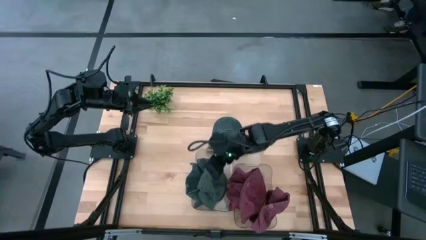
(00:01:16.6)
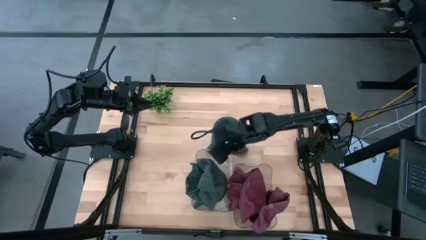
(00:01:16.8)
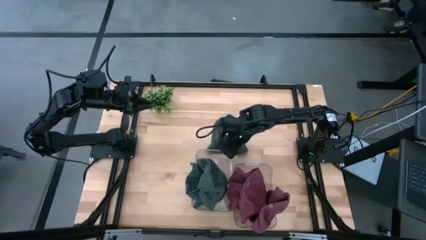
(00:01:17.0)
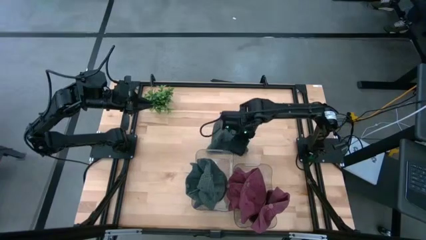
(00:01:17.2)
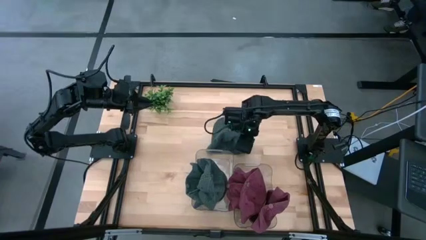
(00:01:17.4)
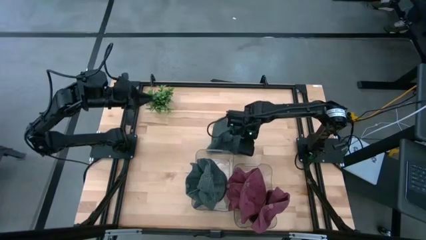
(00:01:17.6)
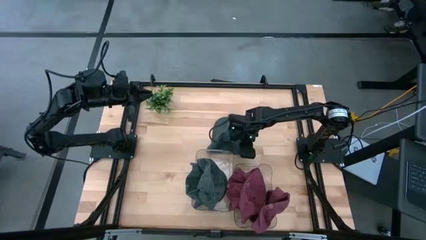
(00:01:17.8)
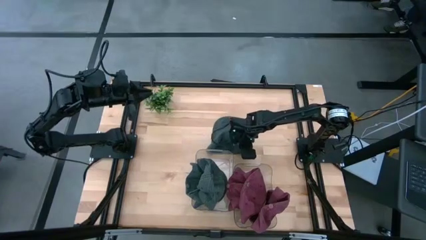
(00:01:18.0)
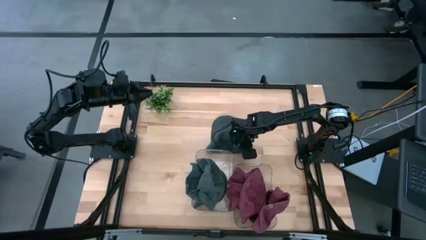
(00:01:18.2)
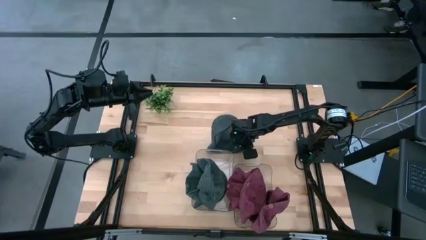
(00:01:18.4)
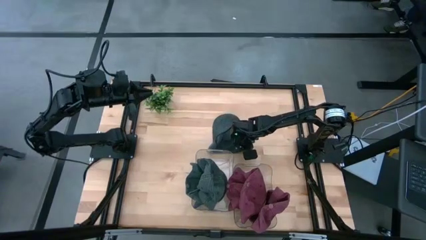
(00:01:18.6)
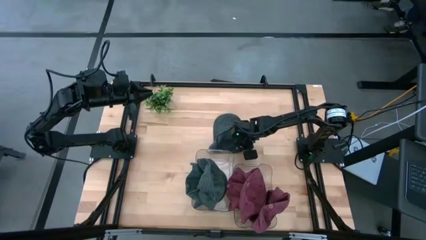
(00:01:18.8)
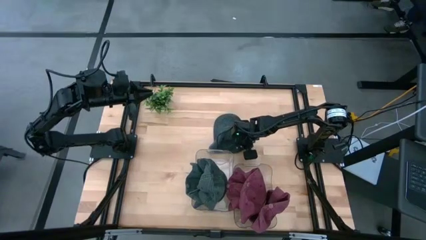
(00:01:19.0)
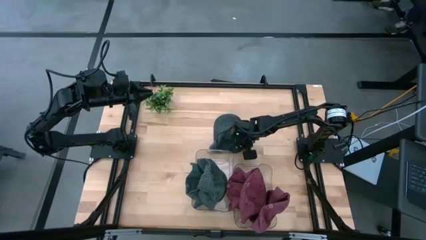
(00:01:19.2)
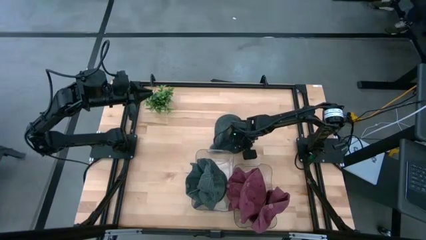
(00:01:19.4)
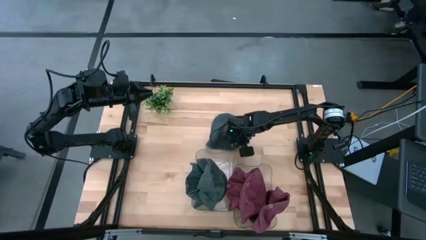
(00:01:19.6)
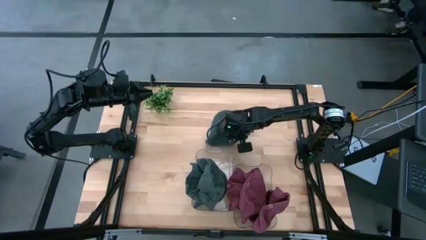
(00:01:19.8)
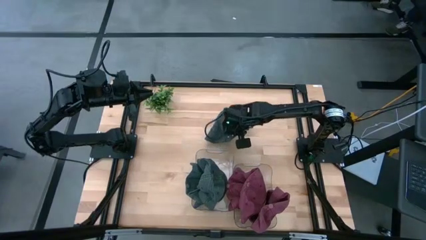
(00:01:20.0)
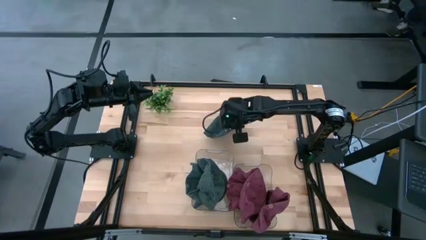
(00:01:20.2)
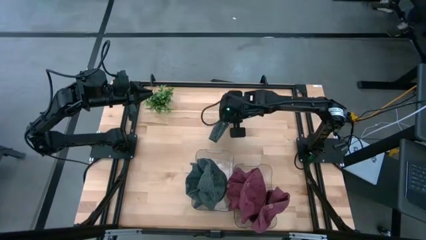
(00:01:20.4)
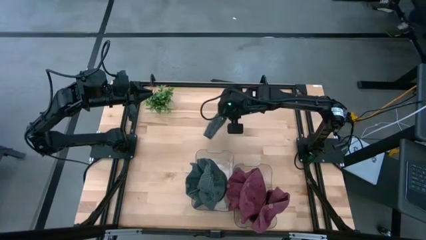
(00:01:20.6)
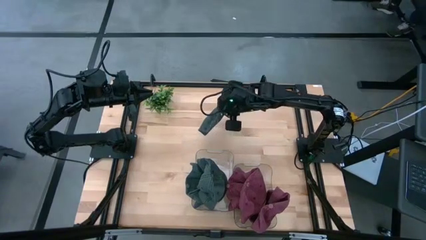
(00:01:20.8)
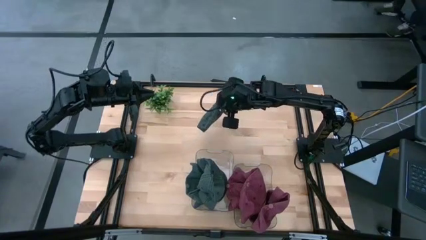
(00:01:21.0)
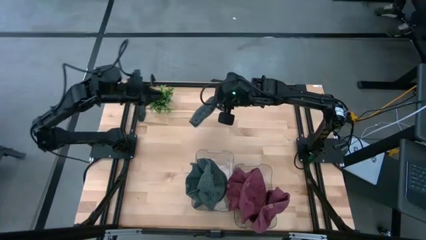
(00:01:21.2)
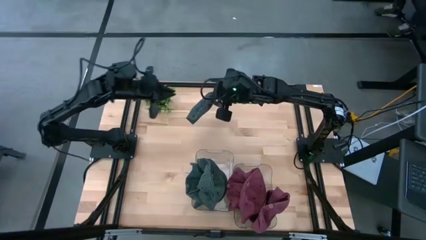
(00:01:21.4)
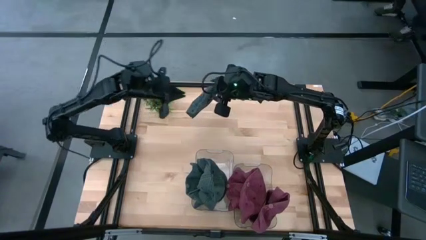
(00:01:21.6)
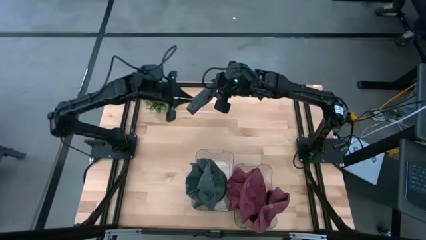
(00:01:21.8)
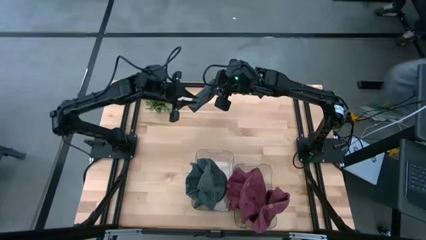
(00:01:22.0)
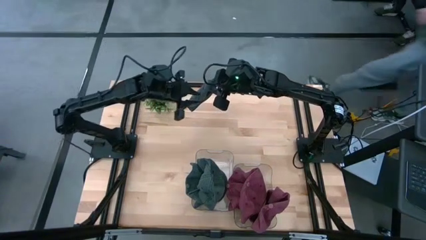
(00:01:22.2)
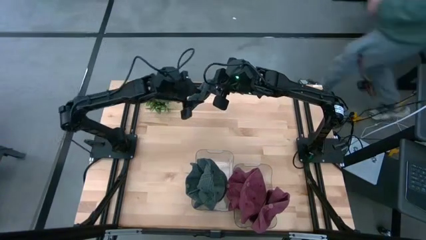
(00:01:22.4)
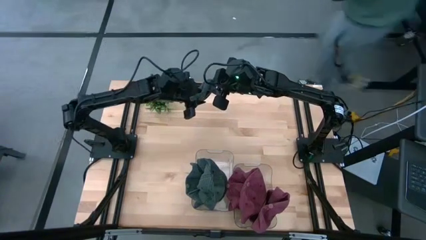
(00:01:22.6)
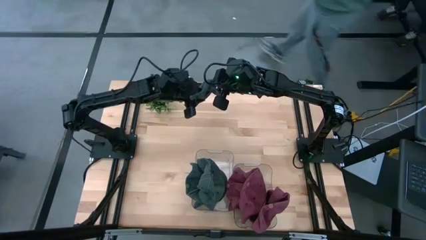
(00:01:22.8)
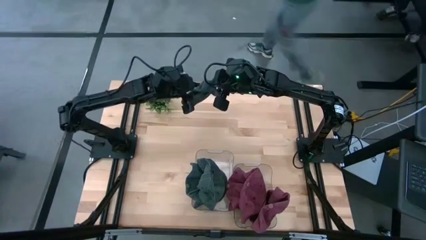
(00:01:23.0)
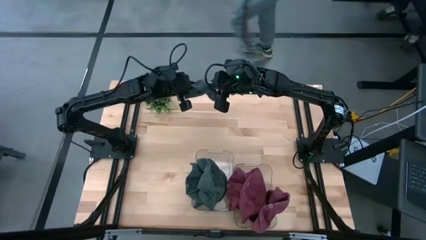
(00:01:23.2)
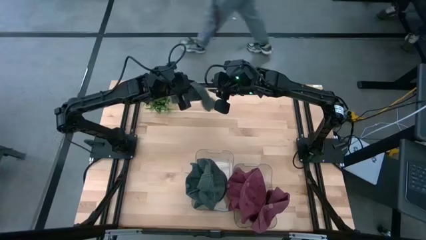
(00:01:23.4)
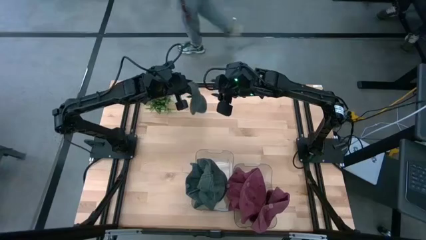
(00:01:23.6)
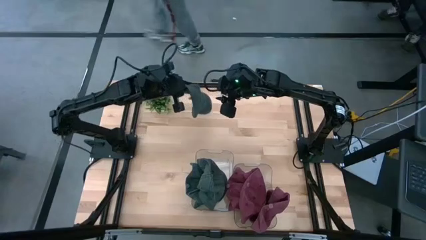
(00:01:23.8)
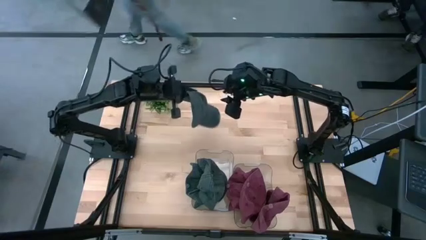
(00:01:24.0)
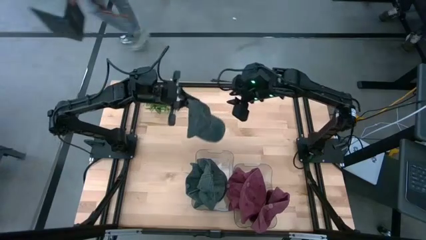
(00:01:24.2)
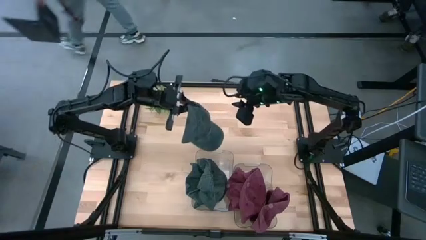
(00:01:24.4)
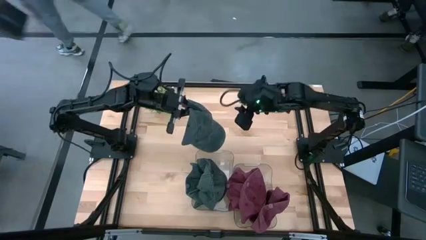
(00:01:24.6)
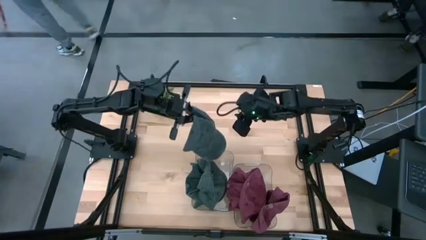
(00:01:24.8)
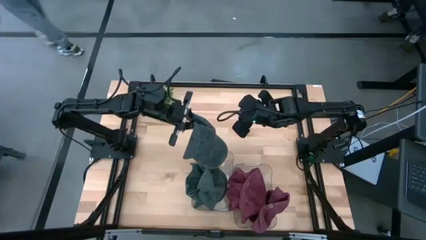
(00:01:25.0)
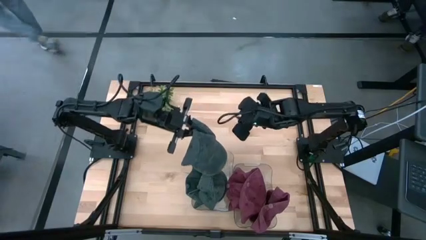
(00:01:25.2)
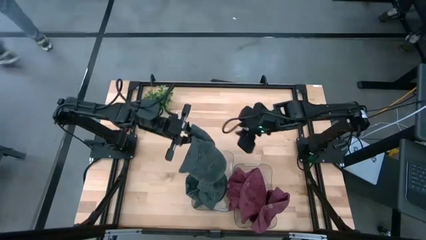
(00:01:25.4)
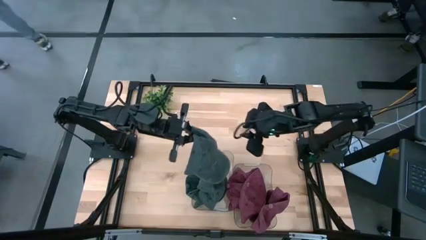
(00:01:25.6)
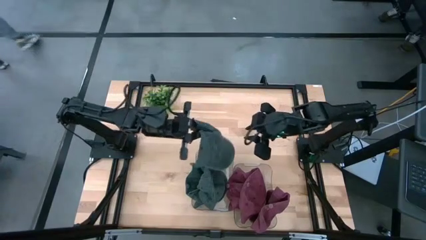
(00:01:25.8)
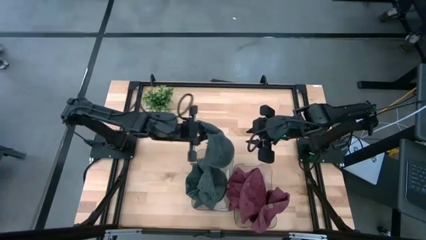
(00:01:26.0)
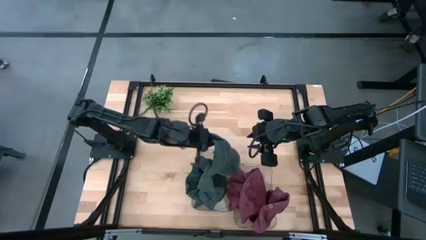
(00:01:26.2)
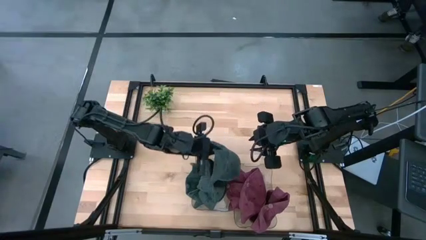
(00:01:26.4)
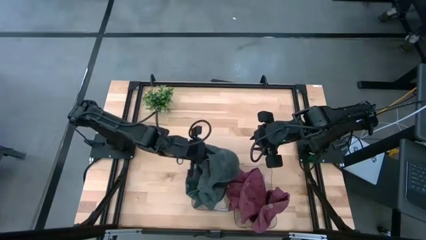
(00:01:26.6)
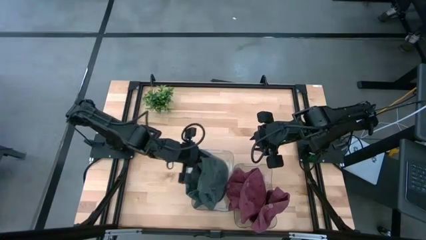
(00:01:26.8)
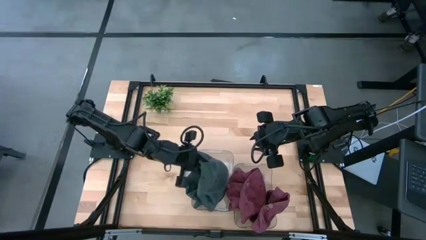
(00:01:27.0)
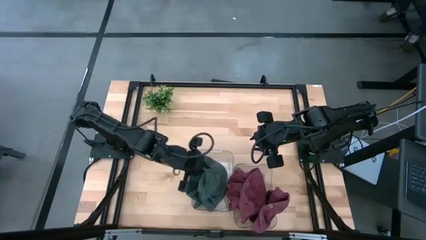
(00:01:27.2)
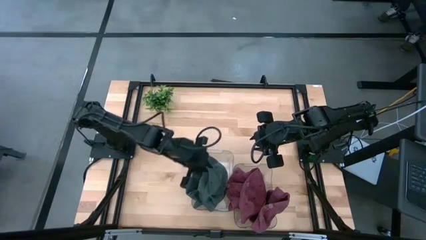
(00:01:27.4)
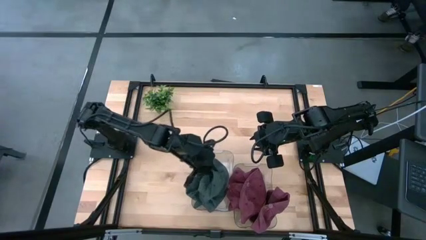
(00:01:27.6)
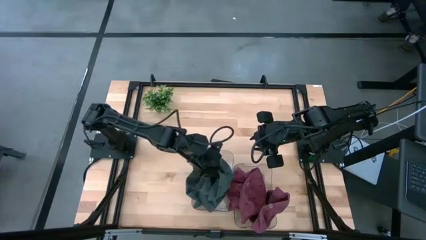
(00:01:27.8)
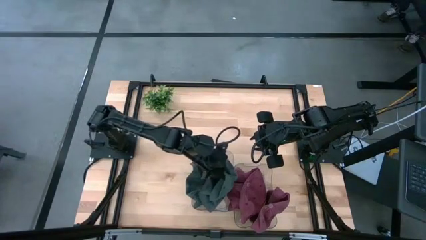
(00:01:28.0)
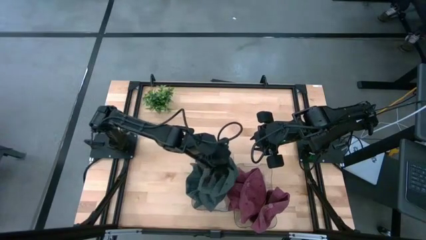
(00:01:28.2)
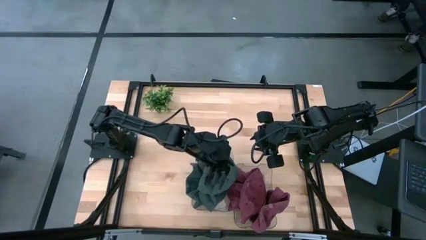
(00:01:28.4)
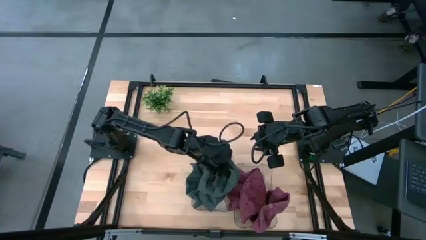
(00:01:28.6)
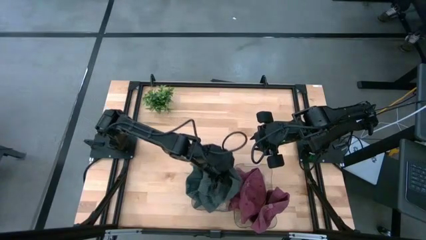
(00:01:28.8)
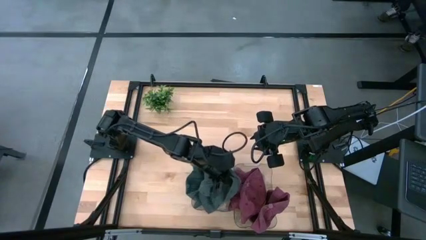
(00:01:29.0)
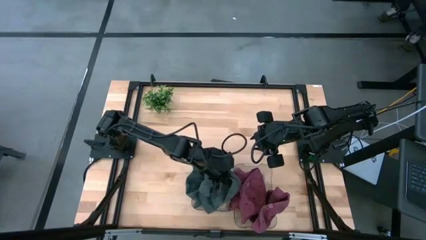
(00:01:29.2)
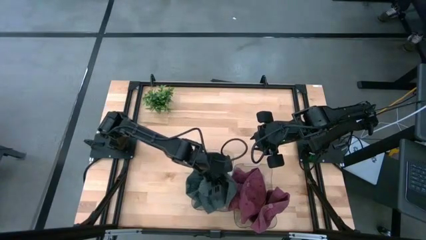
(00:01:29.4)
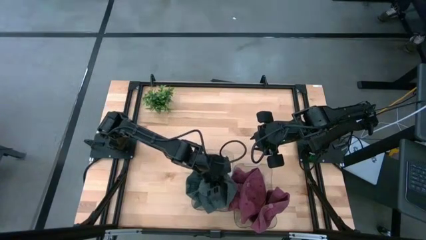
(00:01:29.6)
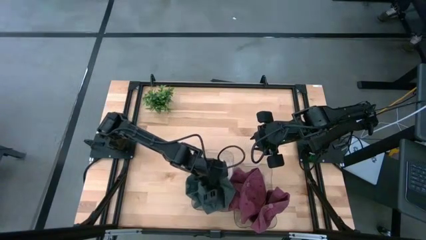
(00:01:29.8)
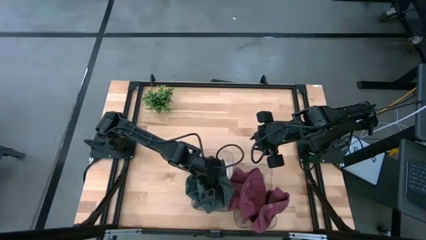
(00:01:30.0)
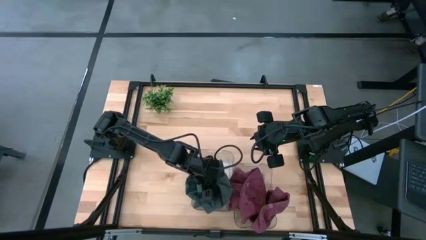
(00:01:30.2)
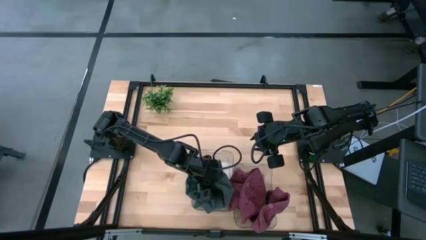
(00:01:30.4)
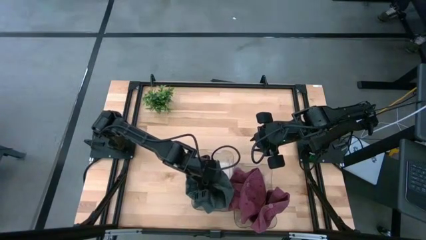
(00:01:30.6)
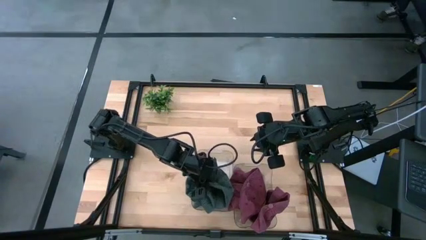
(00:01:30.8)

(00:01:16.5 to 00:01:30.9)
Task: Pick & Place hat
Put the gray cap into the left transparent bin

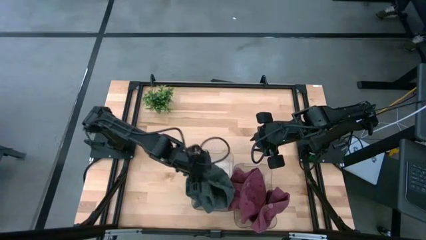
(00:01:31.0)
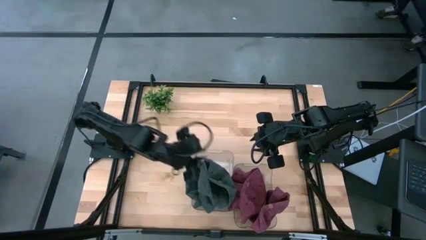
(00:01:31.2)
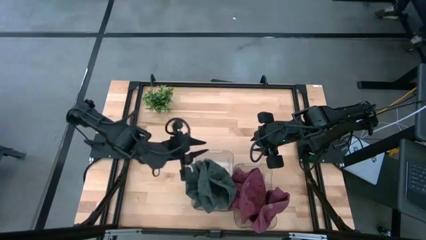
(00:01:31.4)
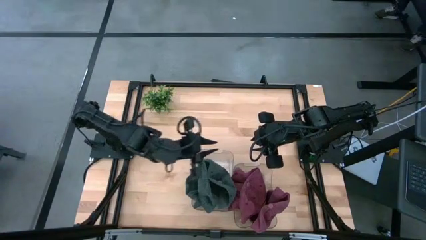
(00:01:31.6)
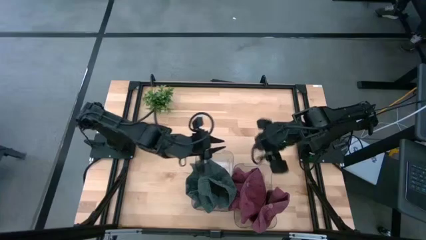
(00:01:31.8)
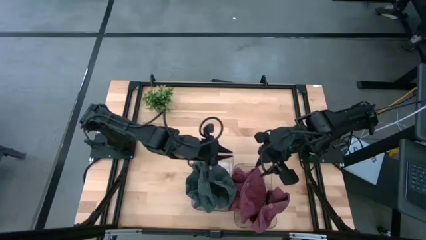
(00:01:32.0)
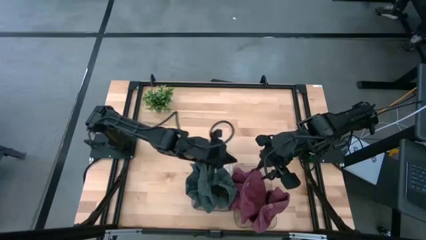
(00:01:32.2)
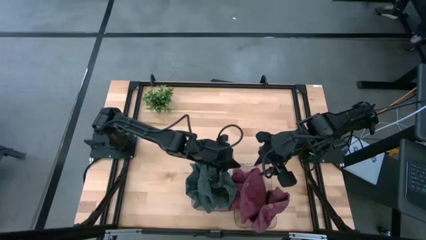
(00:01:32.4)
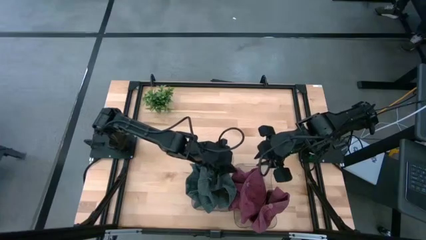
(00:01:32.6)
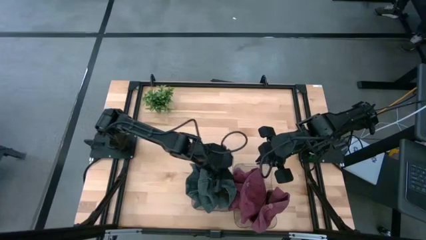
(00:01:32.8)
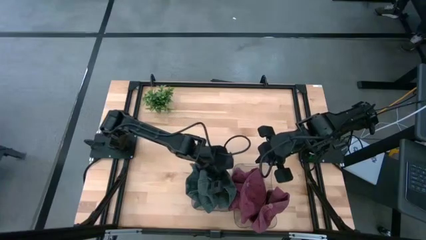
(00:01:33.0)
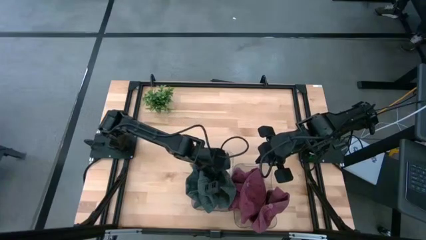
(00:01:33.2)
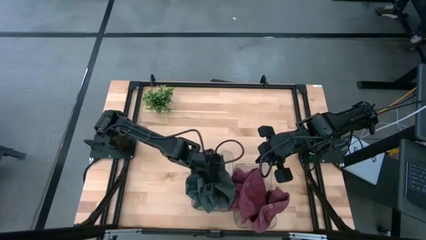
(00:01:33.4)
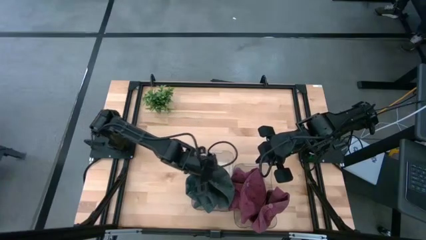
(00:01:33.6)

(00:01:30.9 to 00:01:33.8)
Adjust the gray caps in the left transparent bin
